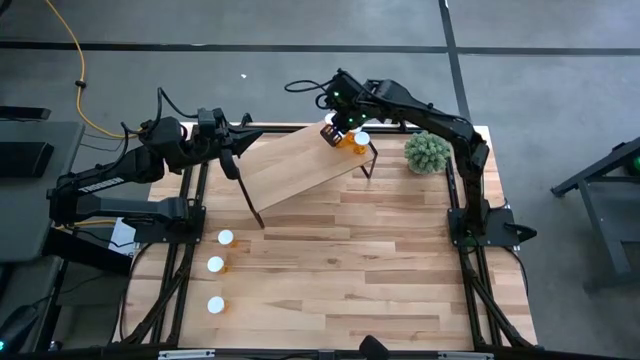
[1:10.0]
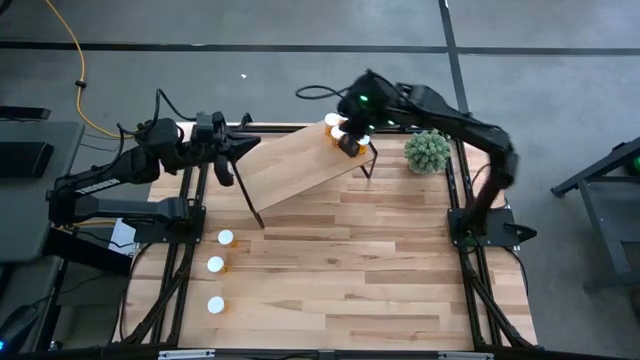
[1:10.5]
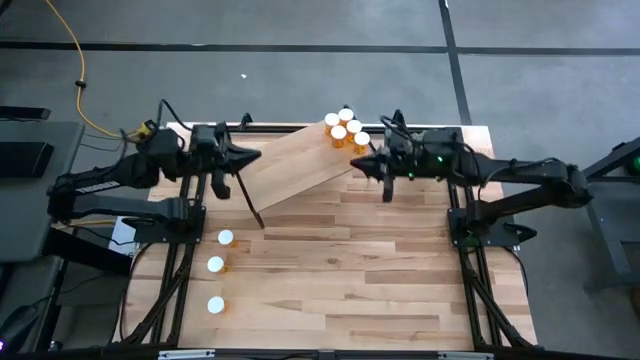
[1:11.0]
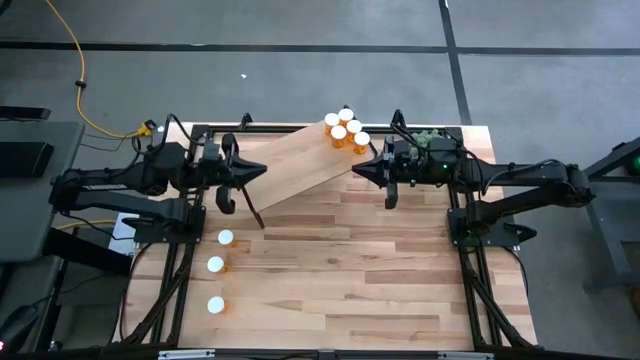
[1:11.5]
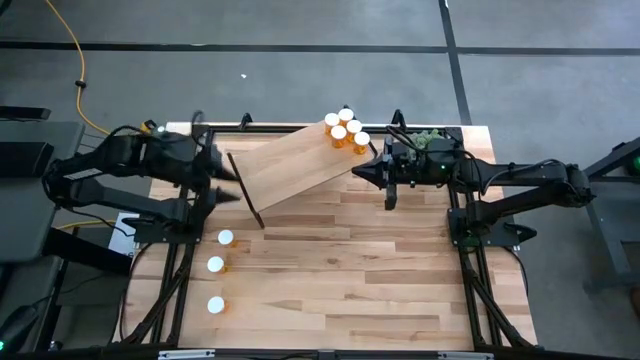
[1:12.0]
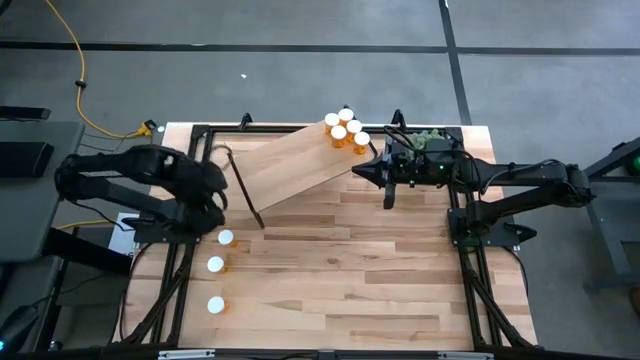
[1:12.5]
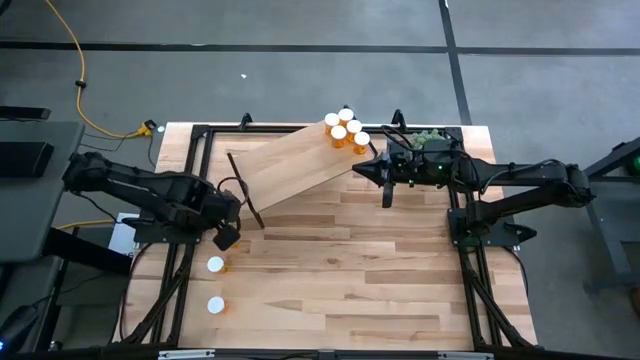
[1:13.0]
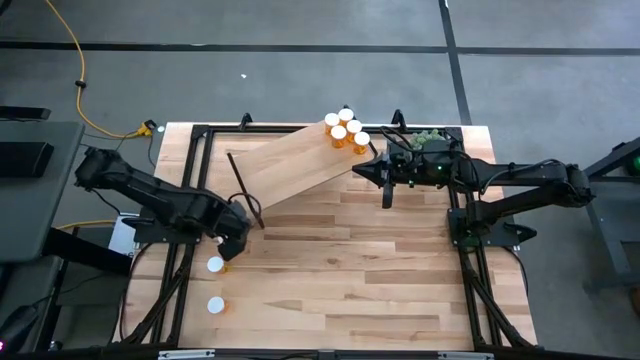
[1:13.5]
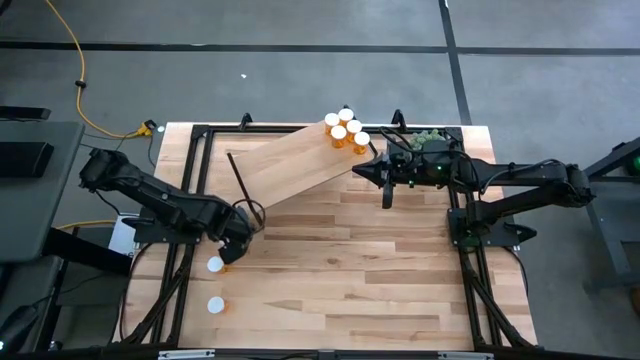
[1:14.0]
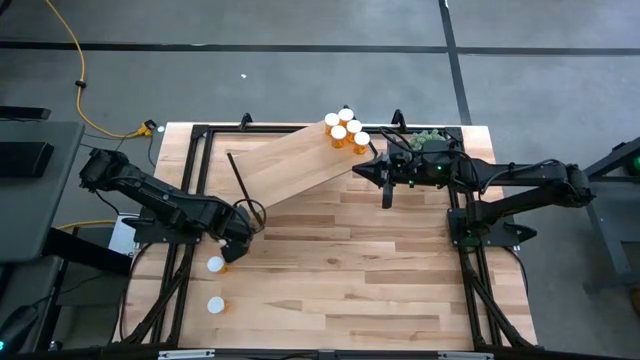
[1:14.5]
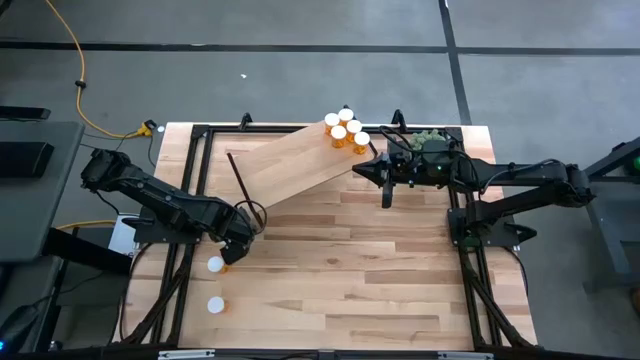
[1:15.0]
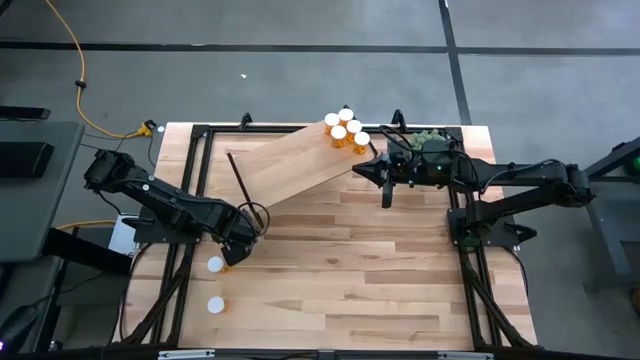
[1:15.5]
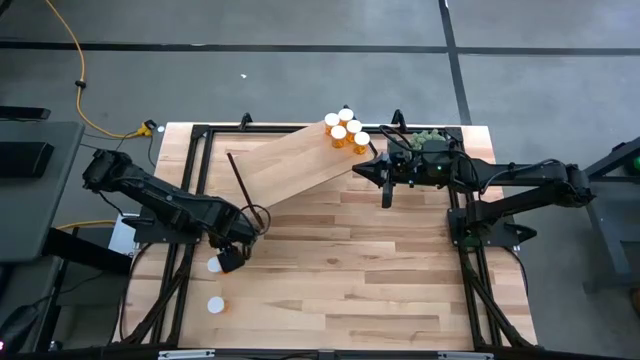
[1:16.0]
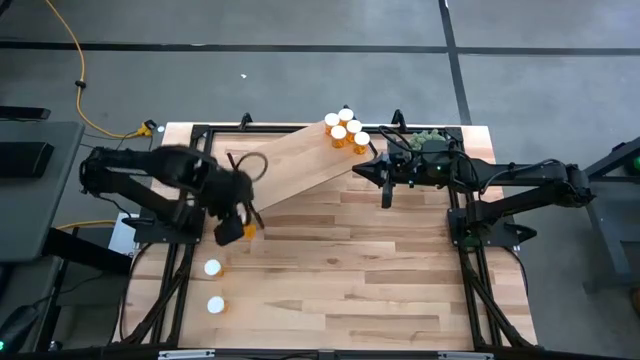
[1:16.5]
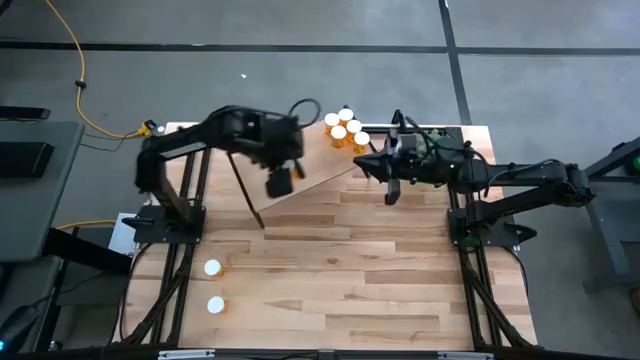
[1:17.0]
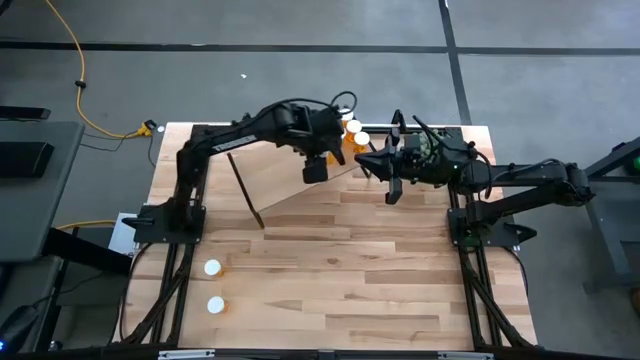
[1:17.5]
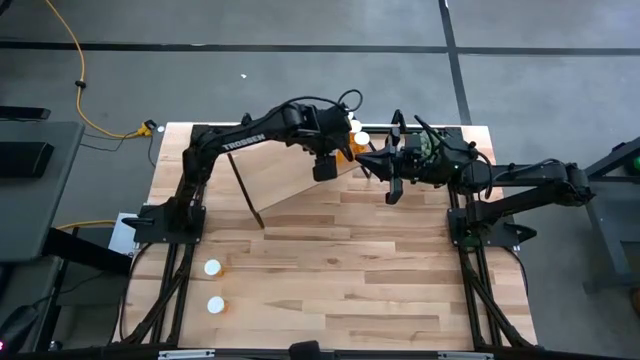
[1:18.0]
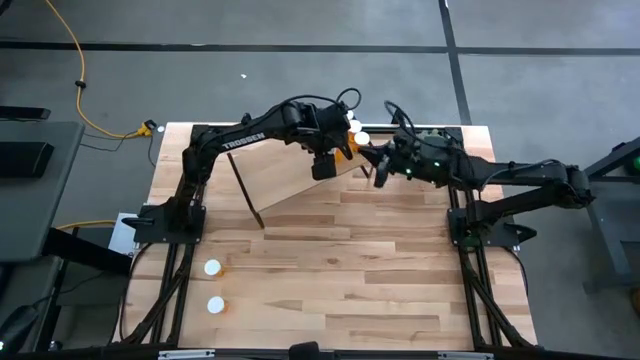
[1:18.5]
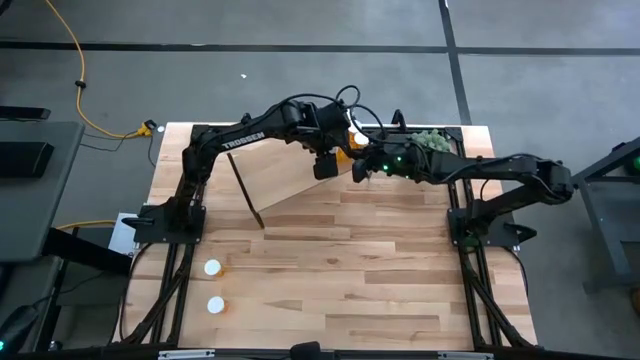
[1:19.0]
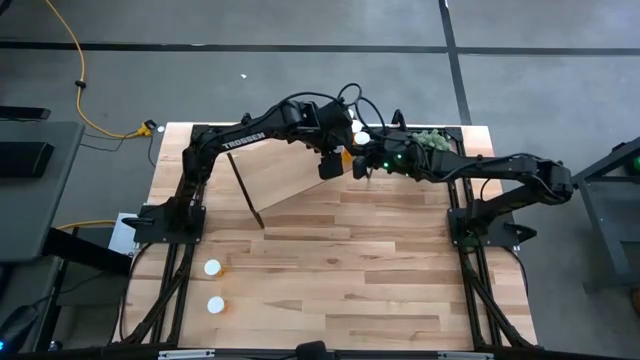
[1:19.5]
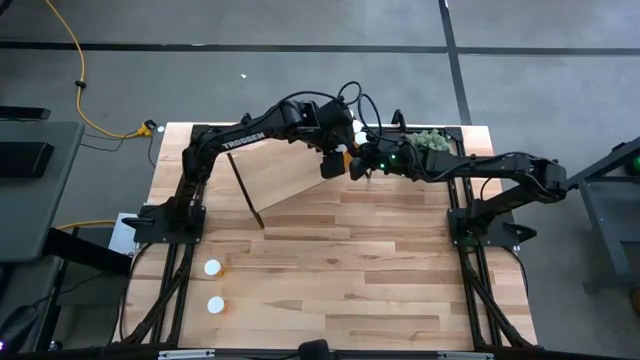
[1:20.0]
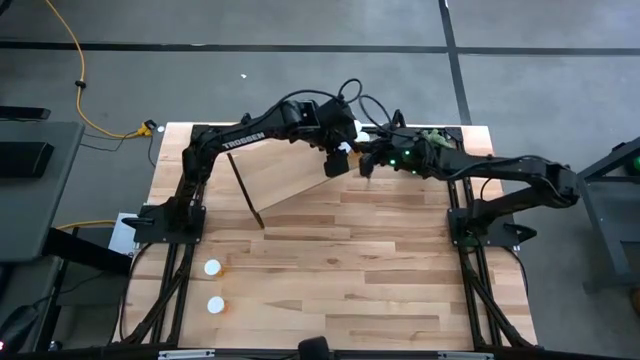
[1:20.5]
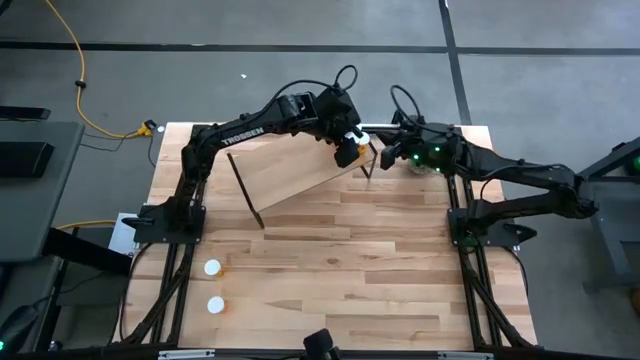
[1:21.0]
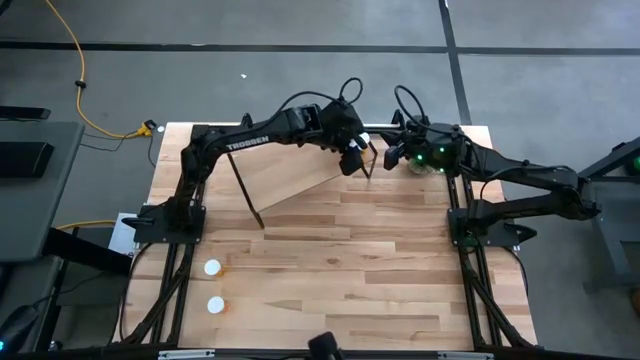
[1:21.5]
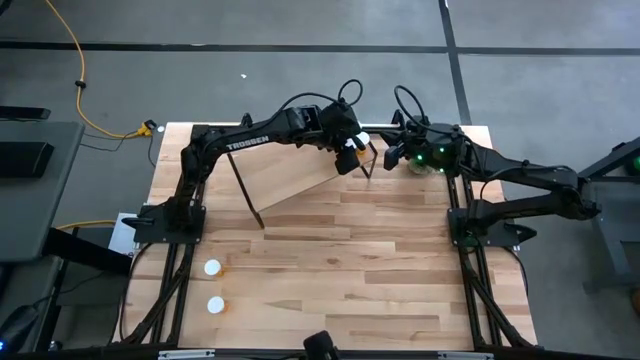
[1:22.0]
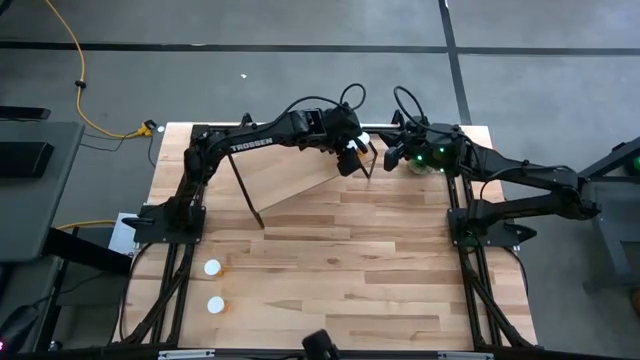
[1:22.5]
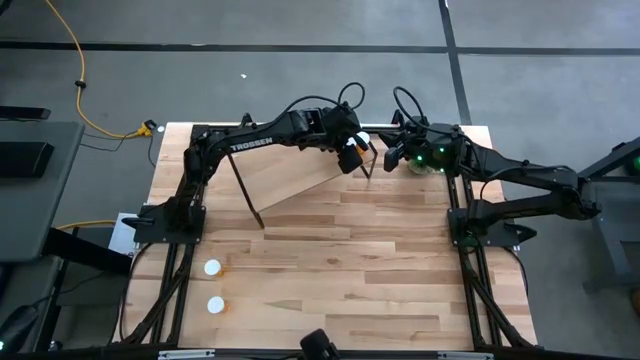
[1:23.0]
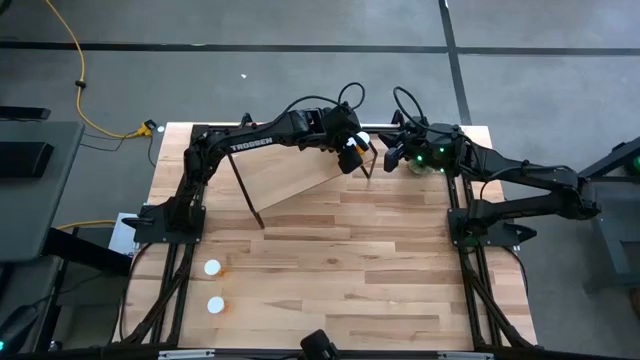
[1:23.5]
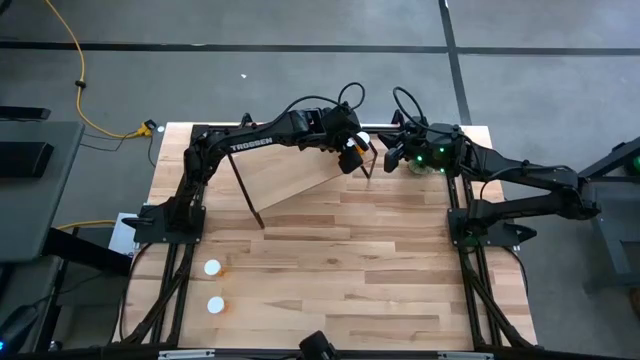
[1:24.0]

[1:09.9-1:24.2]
Task: Pick and place medicine bottles onto shelf by color
Put the pill bottle on the shelf aligned with the other pill bottles

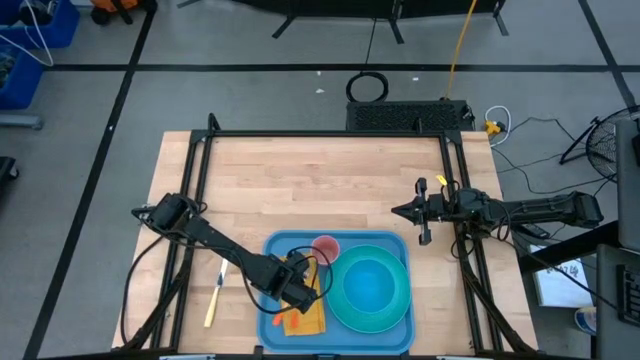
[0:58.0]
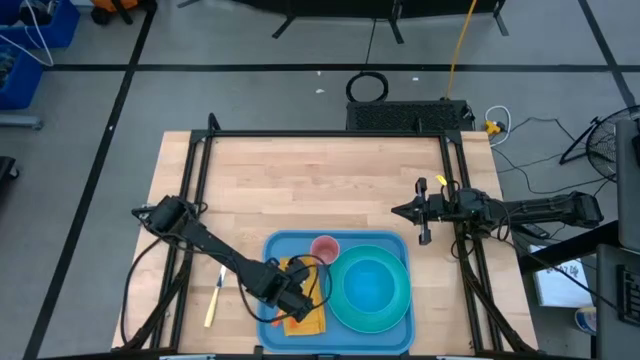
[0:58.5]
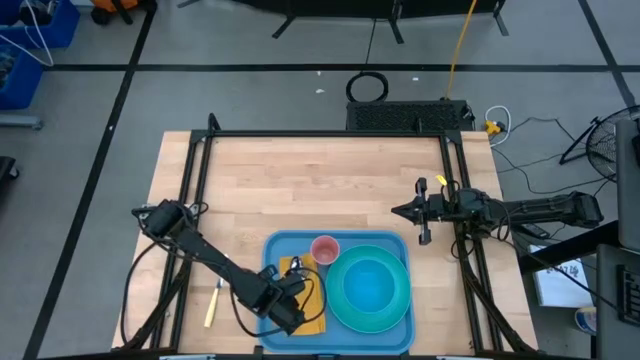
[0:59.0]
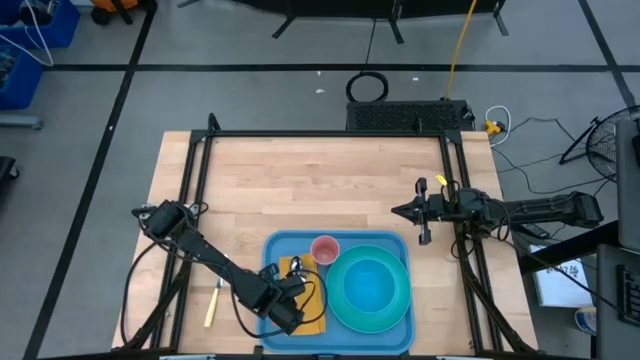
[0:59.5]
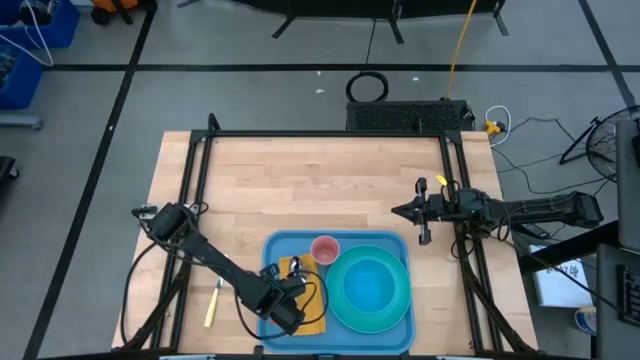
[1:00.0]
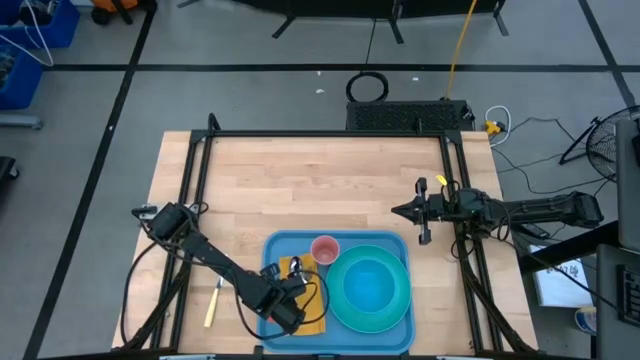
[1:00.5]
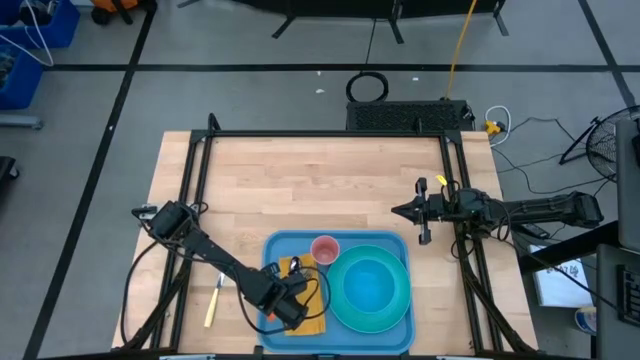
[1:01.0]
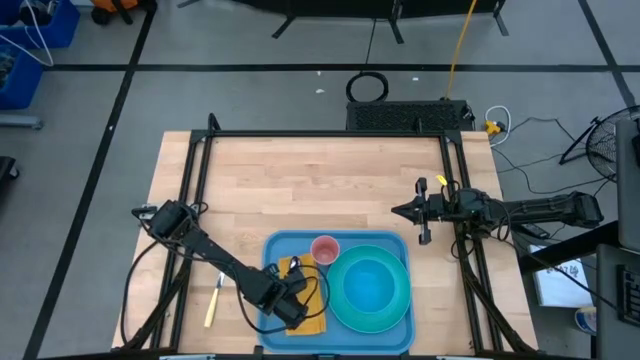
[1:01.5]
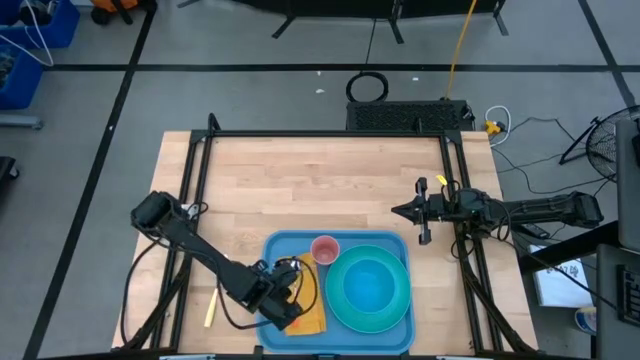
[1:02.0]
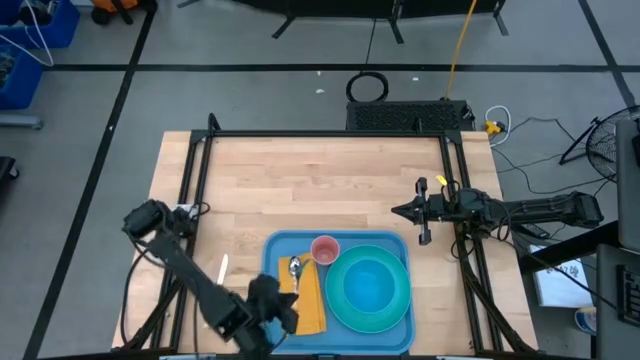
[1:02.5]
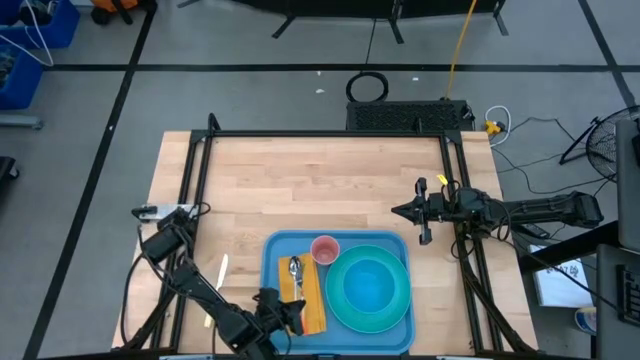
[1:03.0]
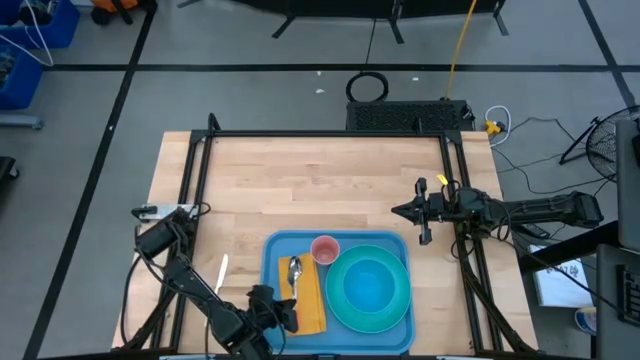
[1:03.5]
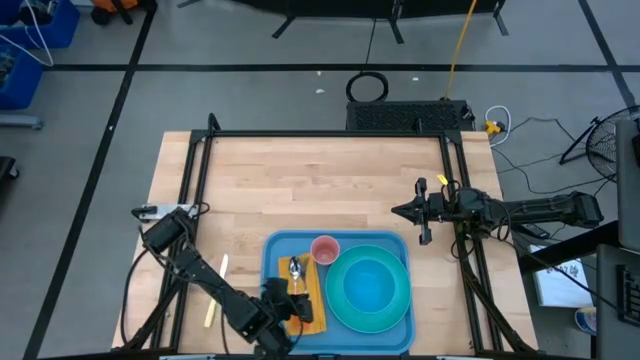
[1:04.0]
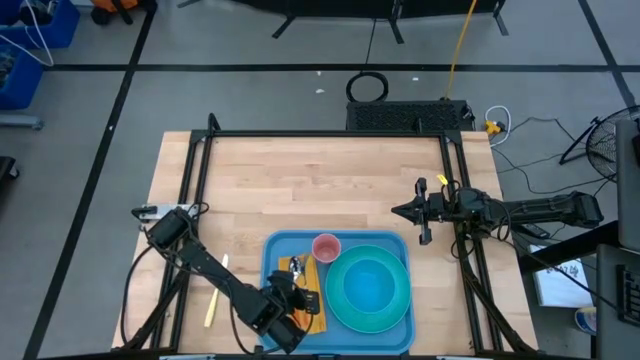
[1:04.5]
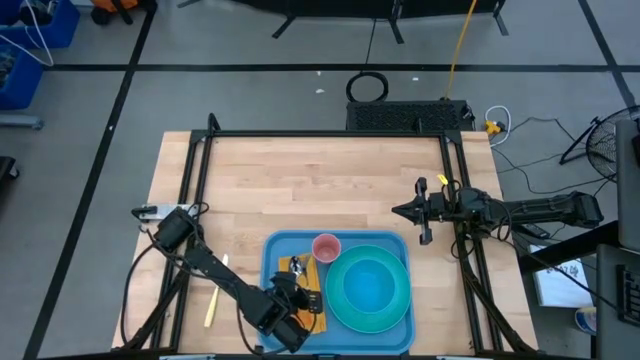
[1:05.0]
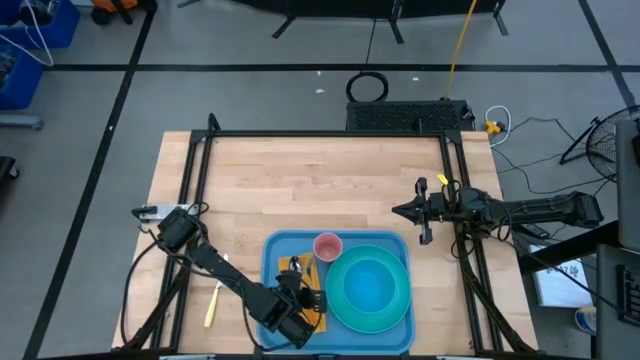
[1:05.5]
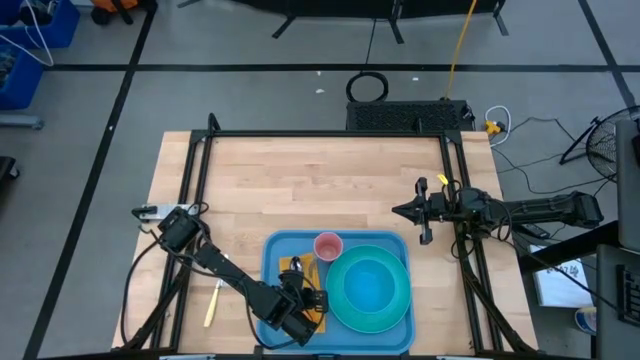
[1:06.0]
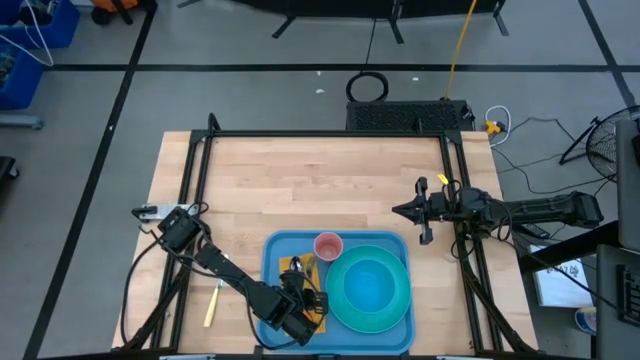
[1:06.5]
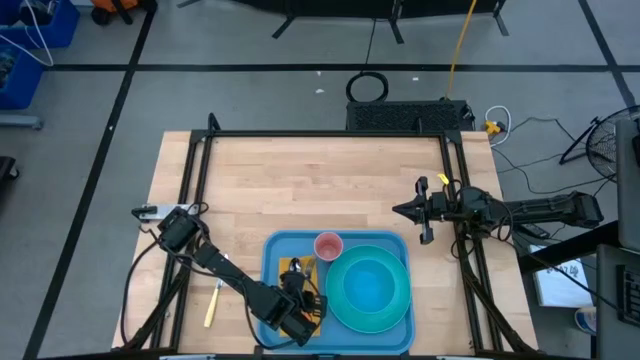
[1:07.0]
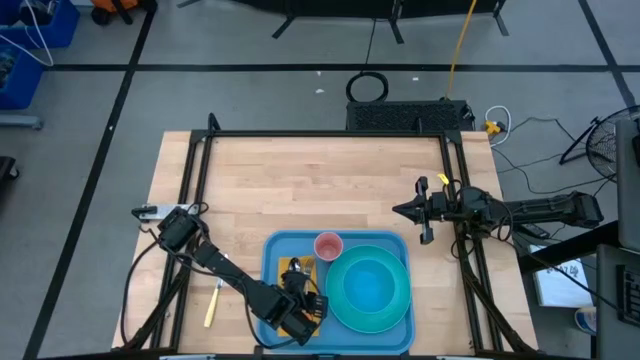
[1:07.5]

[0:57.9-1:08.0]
Task: Set up tray
Adjust the orange fork on the yellow table napkin
